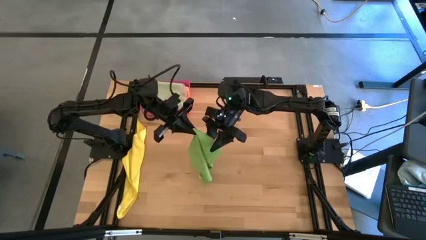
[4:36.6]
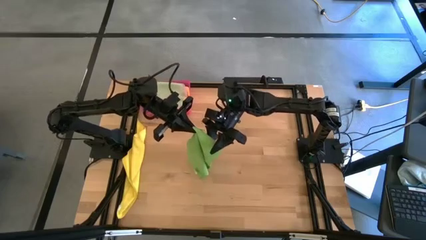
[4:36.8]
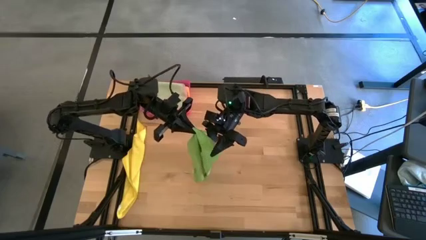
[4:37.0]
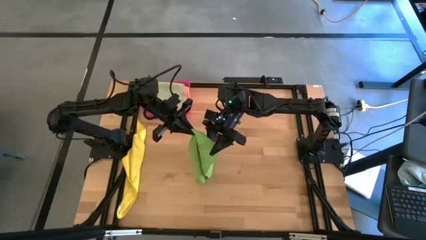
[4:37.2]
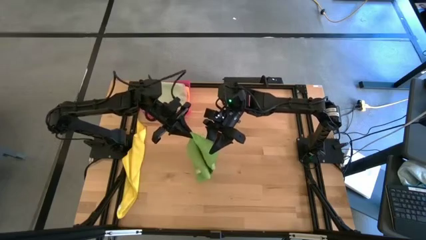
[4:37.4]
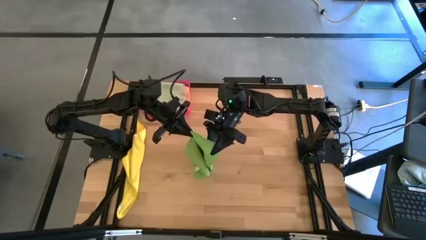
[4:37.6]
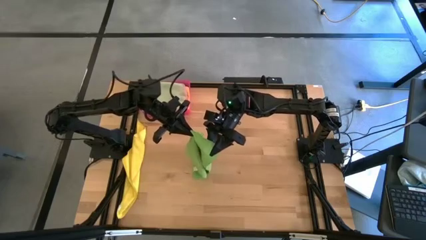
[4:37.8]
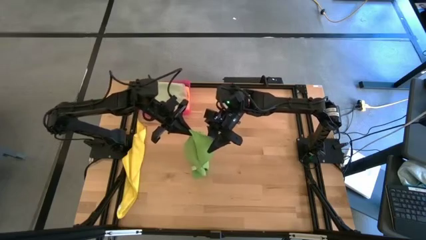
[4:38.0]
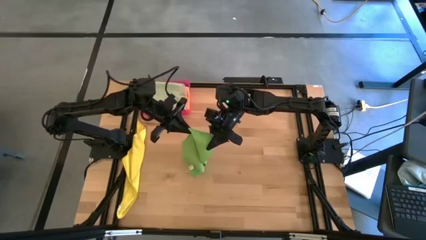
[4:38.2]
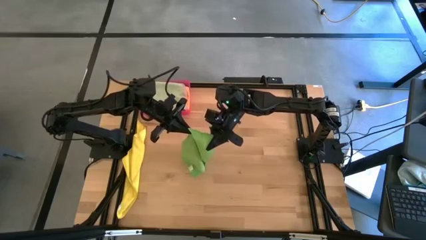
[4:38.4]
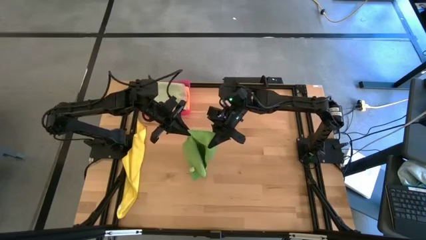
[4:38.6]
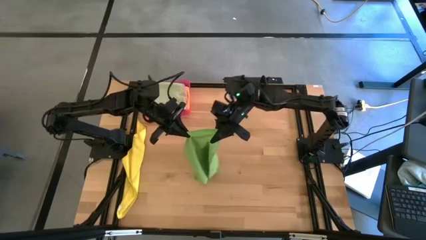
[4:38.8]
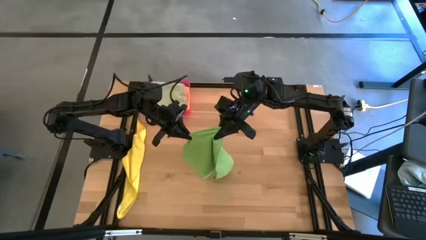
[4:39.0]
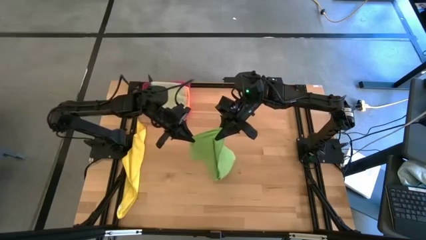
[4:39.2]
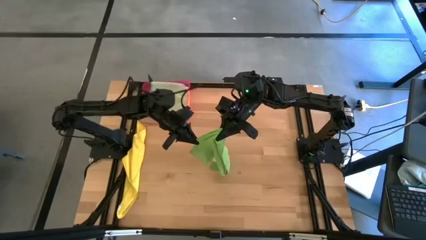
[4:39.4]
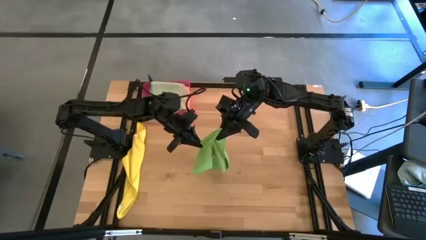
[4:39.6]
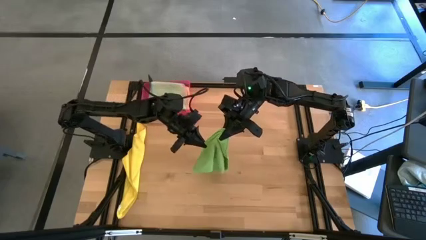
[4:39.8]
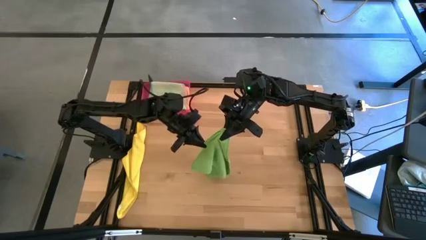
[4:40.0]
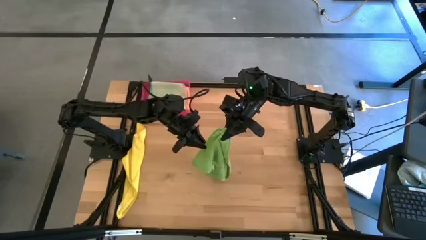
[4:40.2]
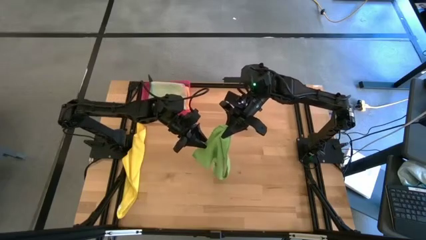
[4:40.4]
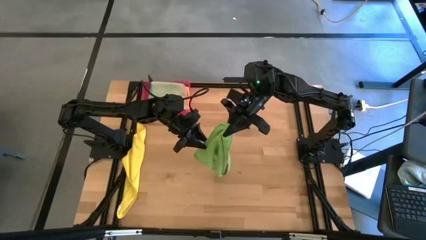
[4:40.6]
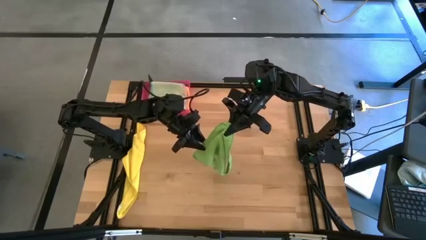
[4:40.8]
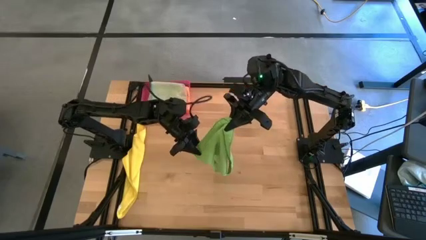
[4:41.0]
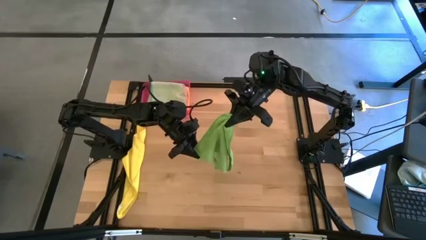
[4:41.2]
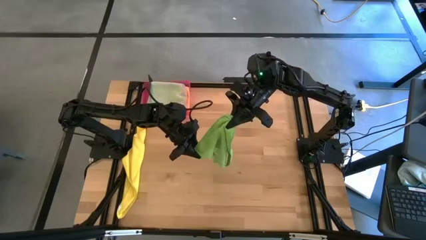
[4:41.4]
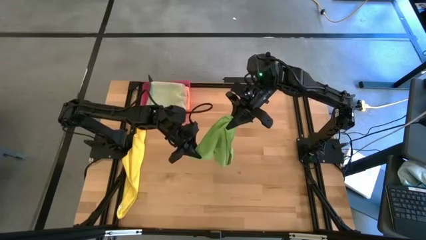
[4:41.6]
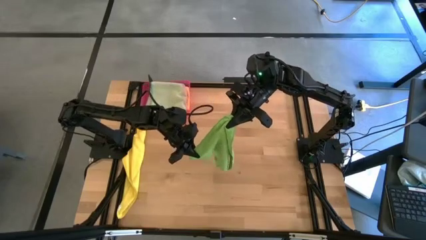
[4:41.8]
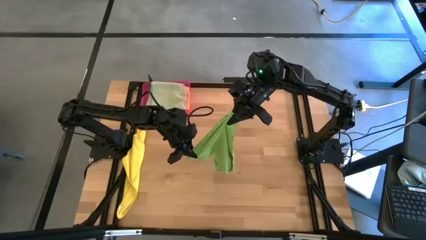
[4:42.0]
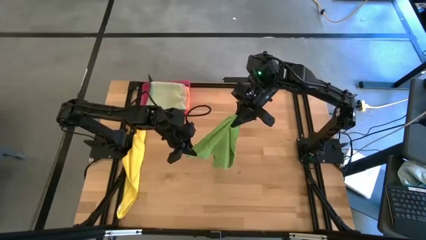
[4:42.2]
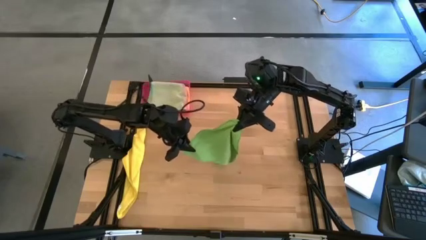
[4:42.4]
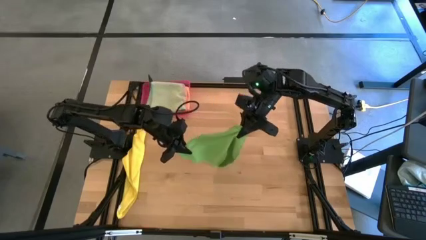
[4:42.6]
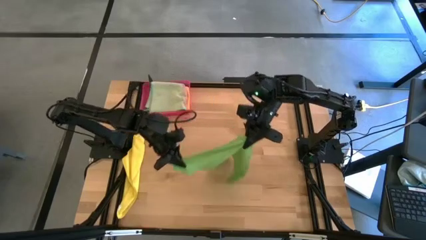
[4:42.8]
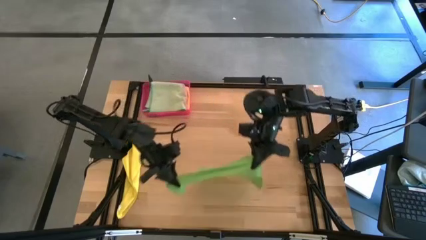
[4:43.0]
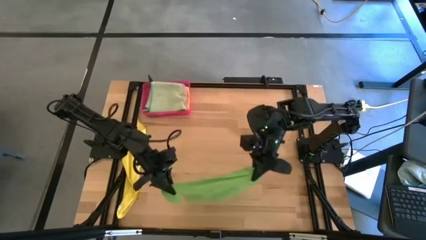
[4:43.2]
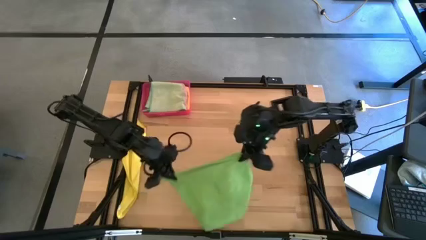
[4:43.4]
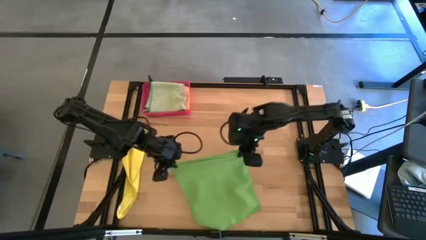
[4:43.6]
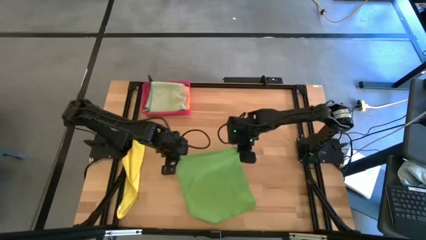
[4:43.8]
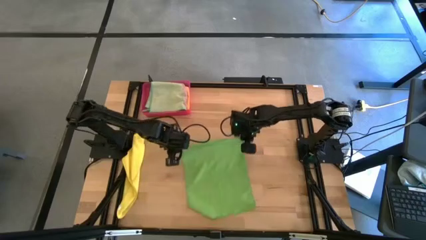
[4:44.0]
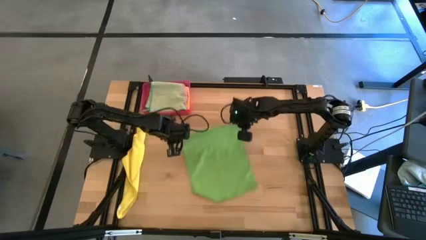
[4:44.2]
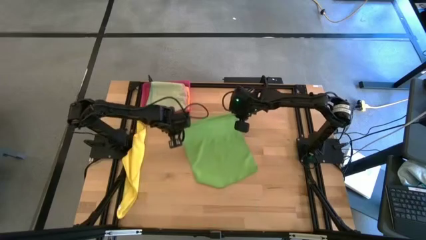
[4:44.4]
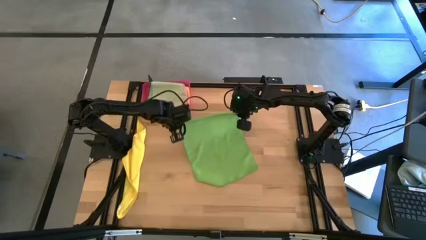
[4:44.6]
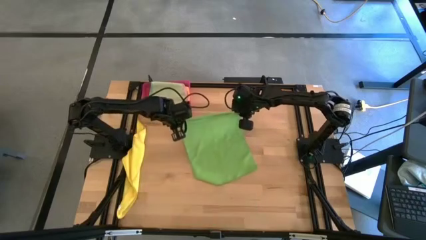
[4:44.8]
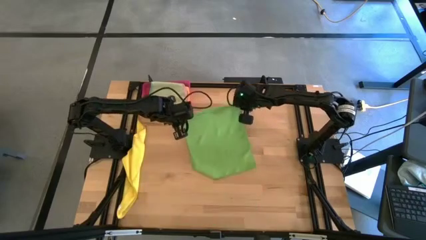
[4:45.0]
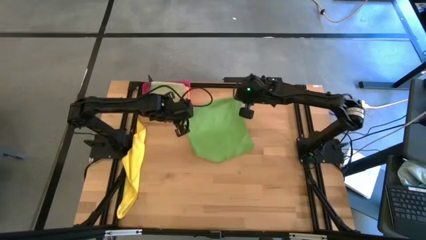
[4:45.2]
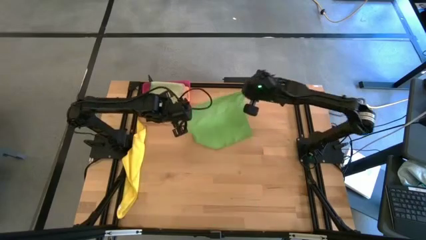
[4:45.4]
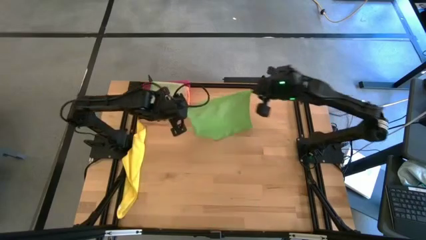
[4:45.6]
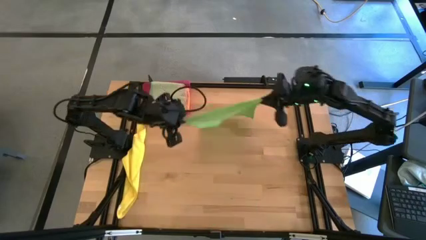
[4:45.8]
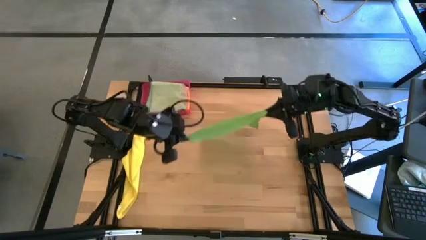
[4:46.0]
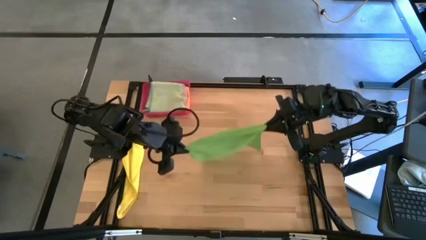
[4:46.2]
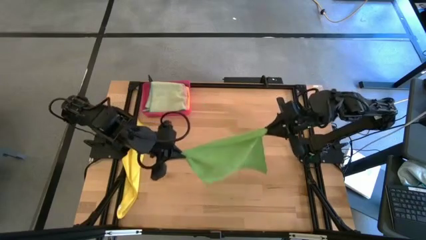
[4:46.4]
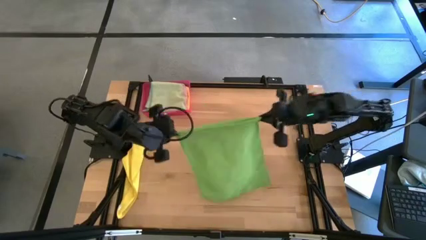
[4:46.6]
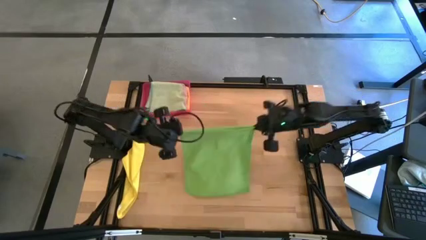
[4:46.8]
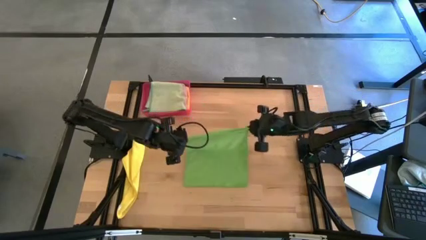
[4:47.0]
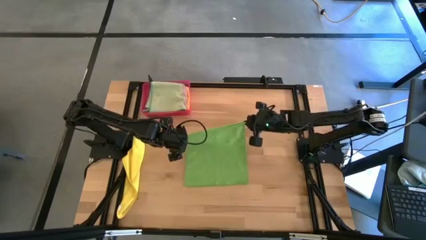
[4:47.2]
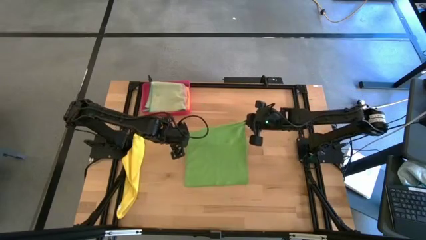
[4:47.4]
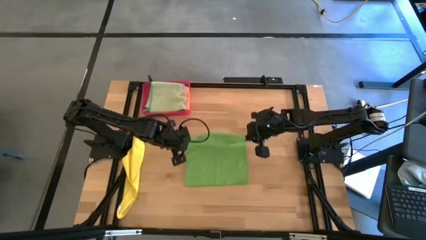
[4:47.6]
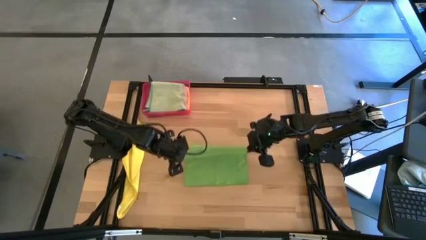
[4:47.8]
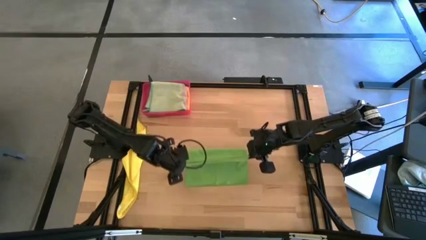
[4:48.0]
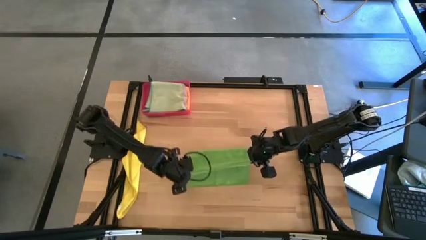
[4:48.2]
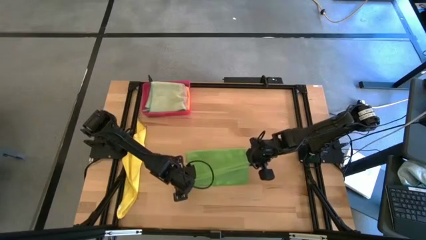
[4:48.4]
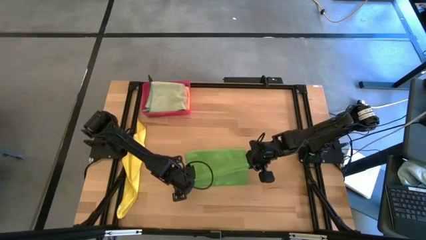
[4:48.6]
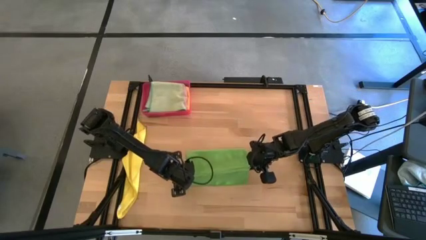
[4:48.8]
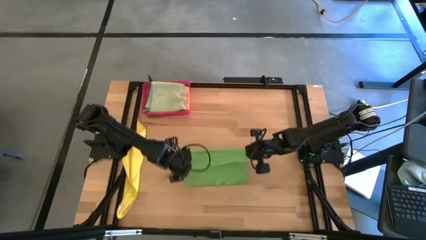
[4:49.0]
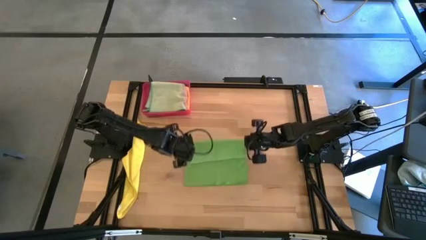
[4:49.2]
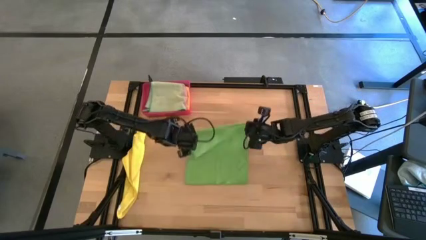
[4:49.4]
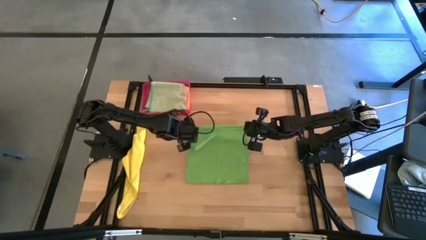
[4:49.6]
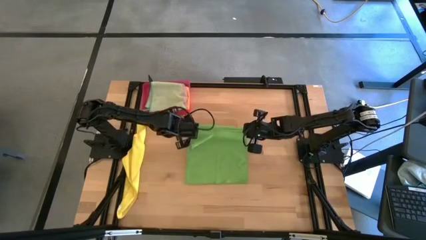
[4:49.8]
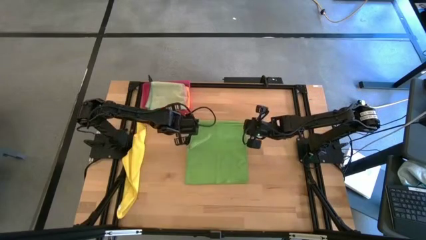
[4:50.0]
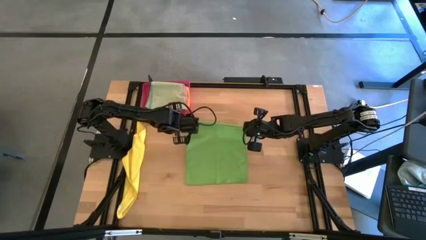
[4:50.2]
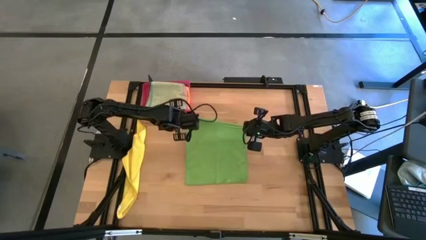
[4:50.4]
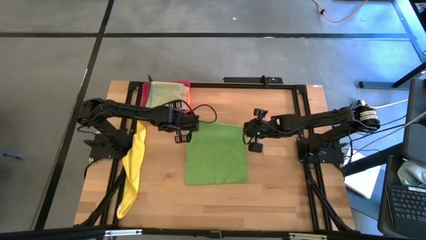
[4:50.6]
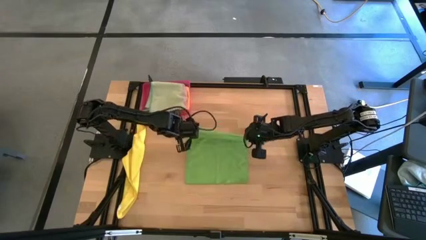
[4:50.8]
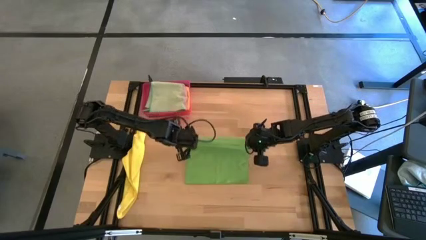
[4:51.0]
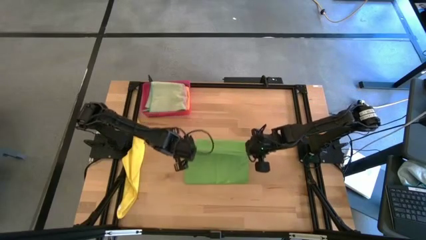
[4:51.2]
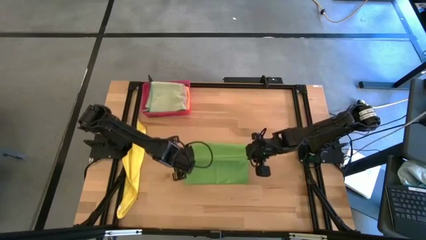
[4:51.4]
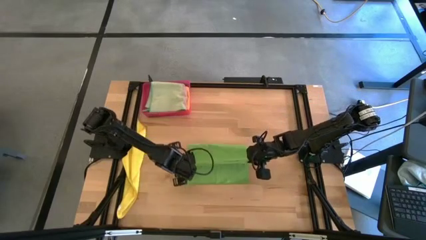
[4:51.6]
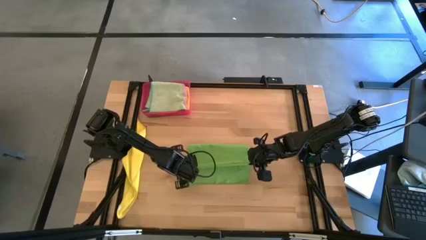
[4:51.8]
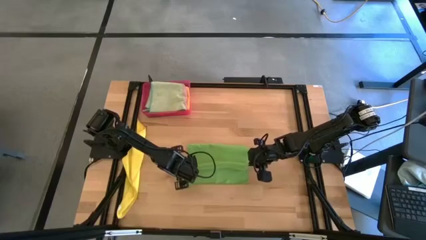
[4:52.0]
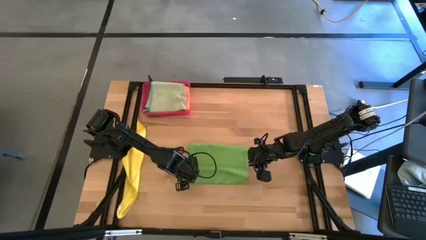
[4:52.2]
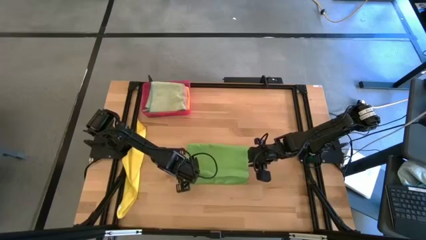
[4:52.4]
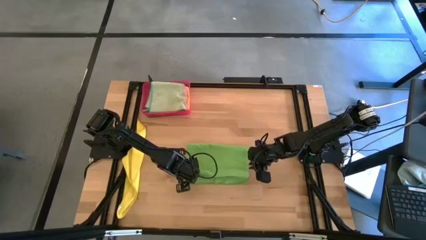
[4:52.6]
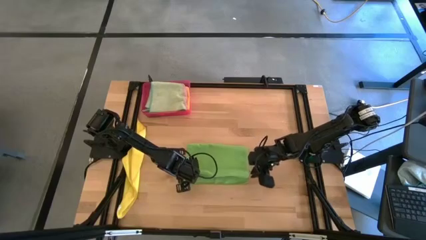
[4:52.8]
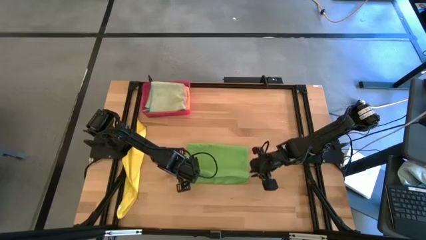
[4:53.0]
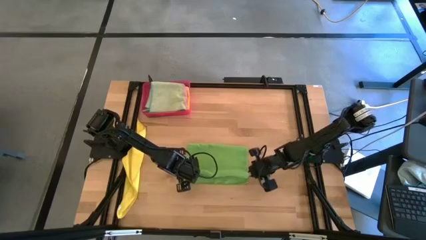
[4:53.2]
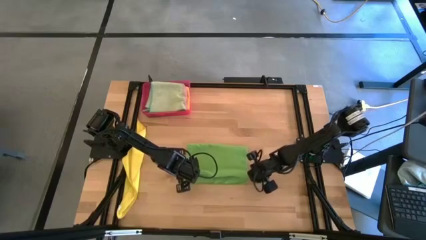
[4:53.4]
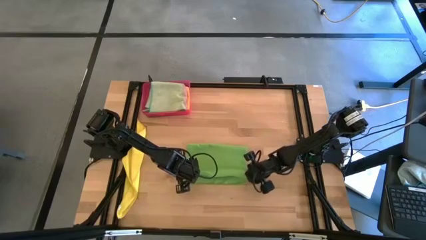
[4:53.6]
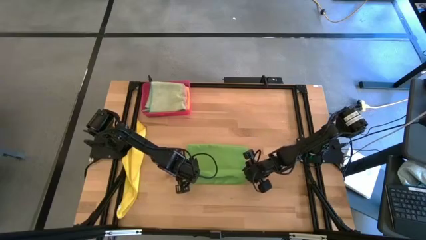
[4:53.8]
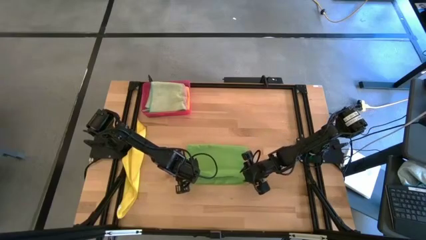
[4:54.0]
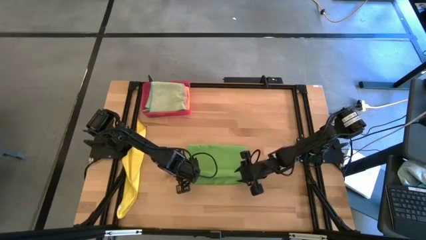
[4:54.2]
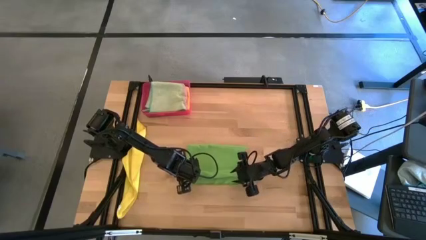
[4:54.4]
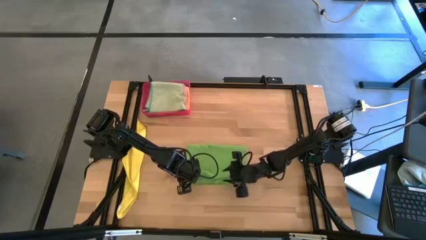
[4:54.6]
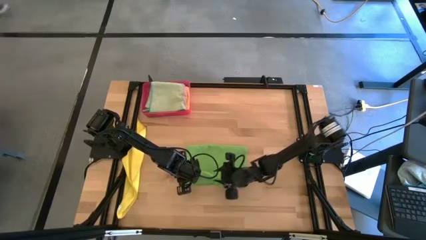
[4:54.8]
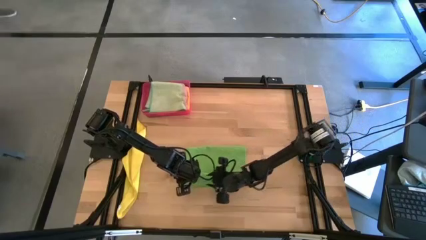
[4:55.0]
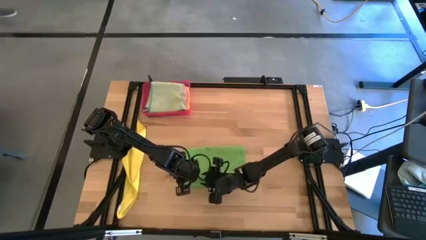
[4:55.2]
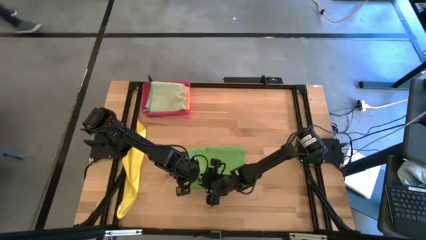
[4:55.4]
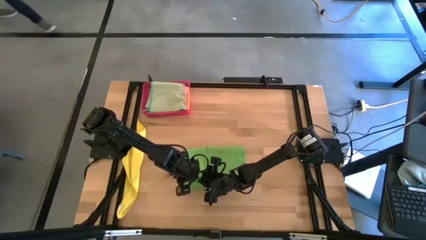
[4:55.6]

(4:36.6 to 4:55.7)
Task: Fold microfiber towels
Fold the green microfiber towel
